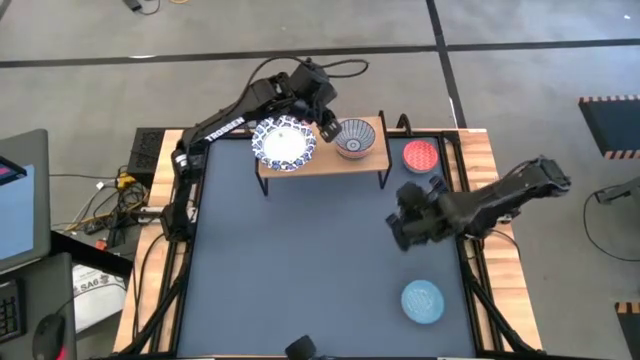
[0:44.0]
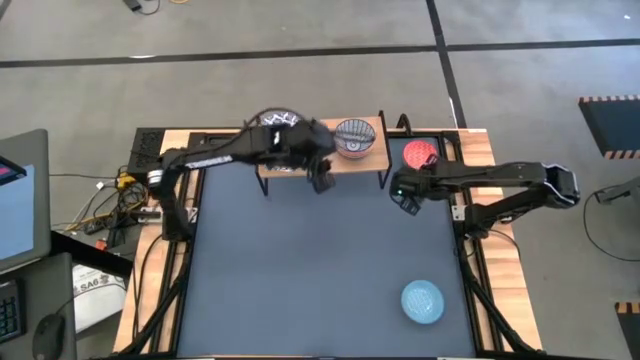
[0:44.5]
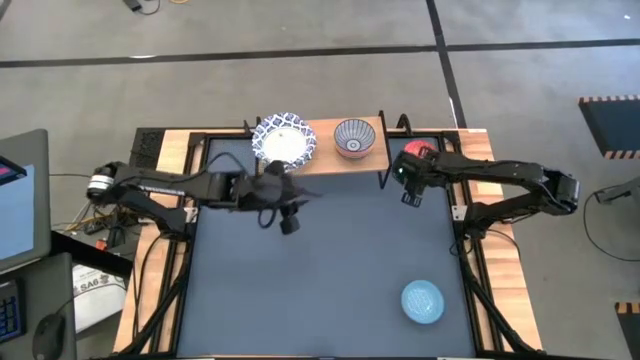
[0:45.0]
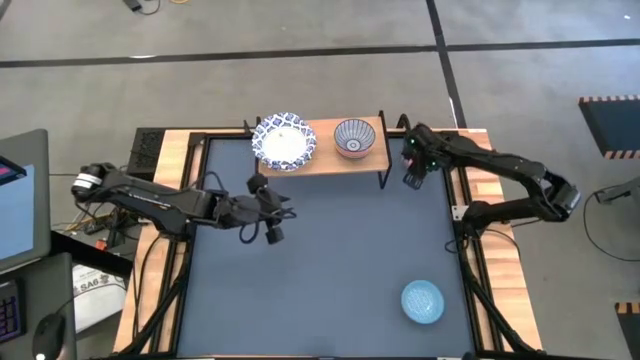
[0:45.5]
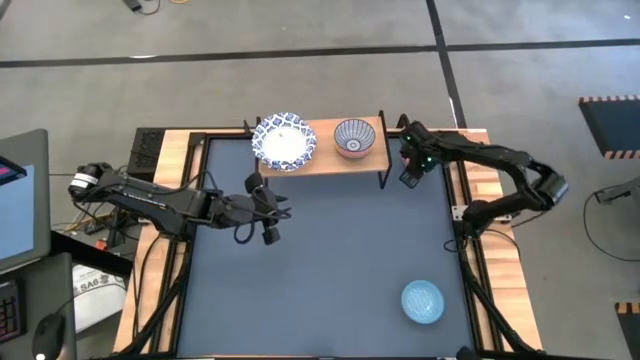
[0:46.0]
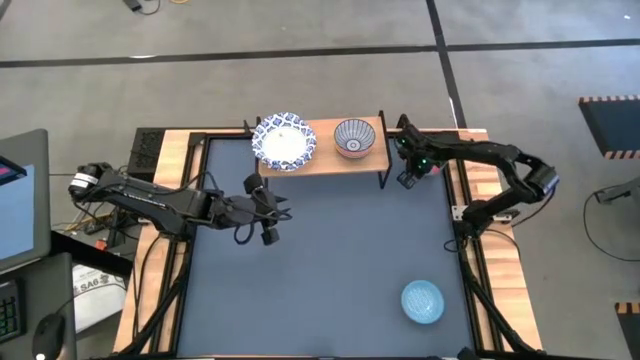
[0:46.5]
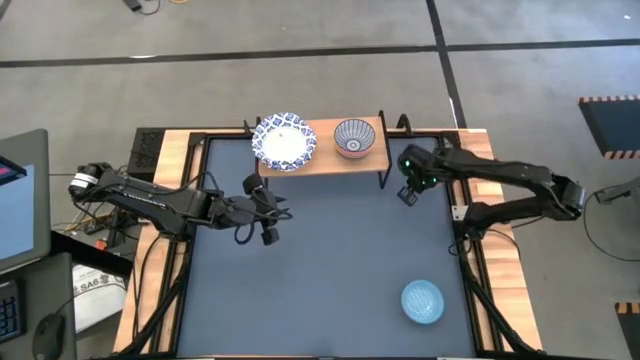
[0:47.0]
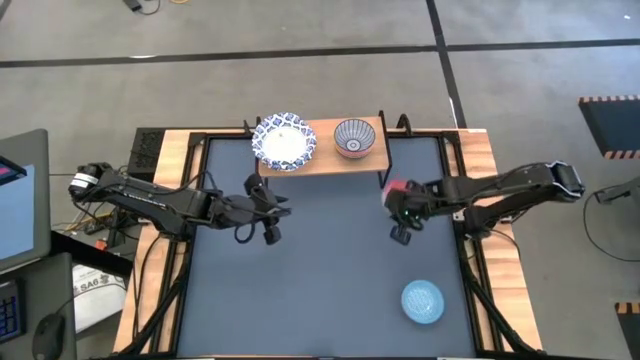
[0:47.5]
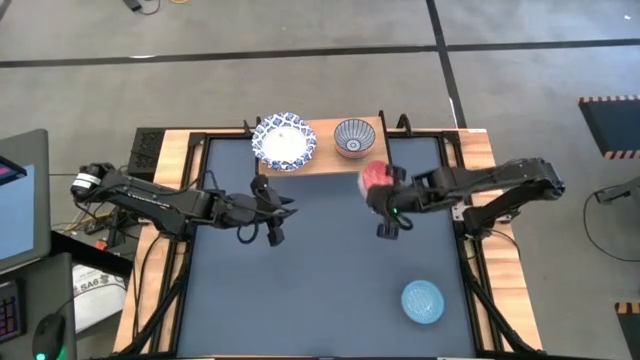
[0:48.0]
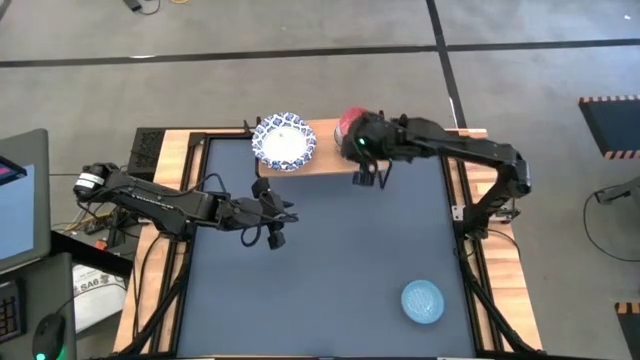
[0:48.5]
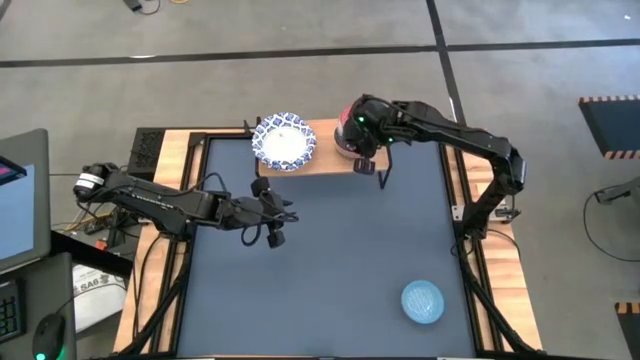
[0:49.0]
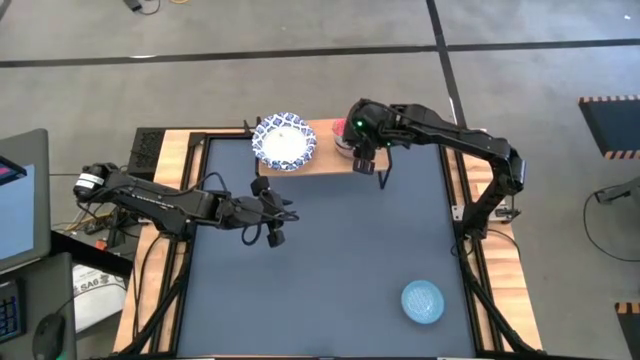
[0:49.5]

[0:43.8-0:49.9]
Task: Place and stack bowls onto a shelf
Stack the red patterned bowl on top of the blue patterned bowl on the shelf

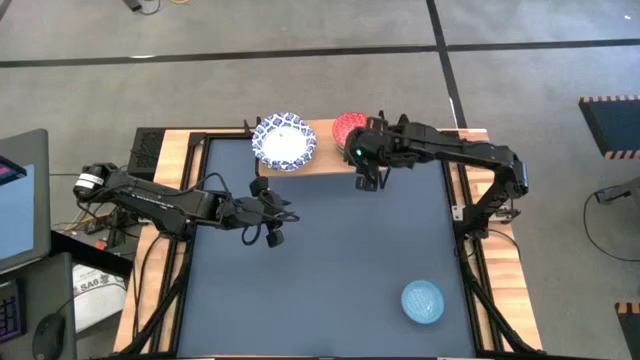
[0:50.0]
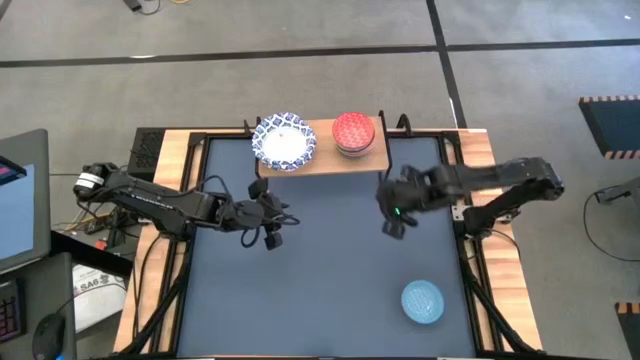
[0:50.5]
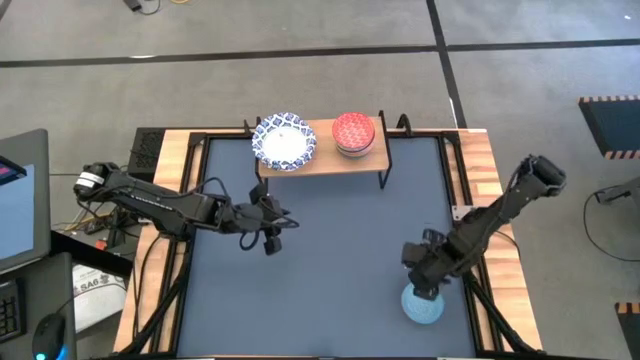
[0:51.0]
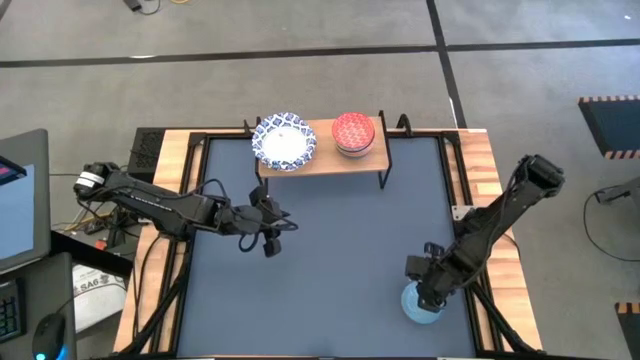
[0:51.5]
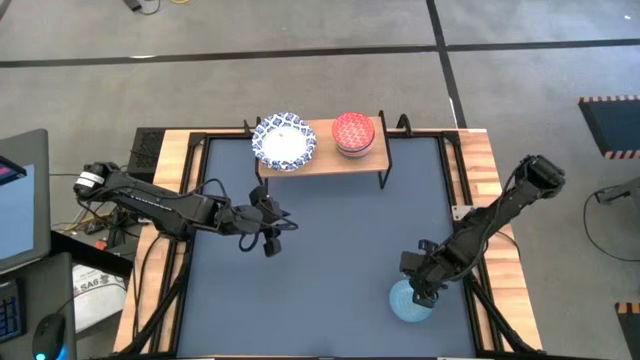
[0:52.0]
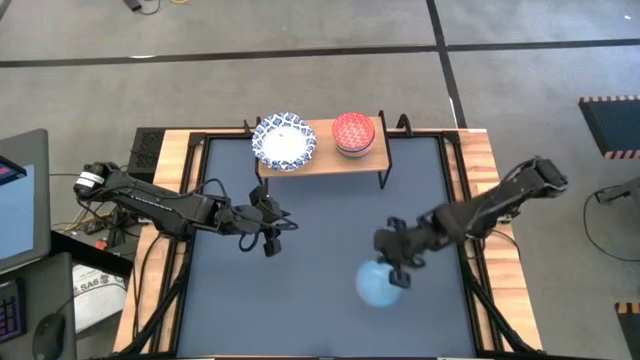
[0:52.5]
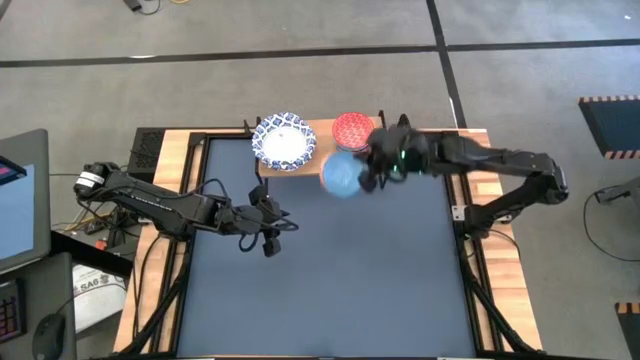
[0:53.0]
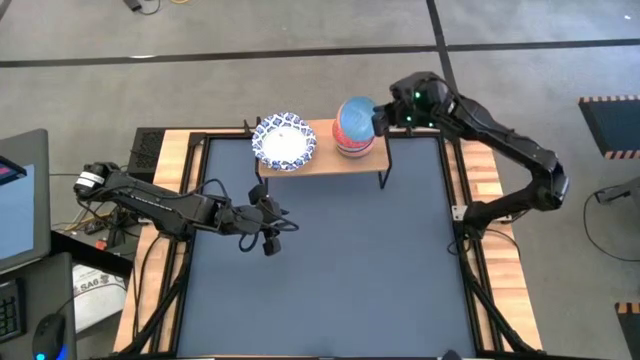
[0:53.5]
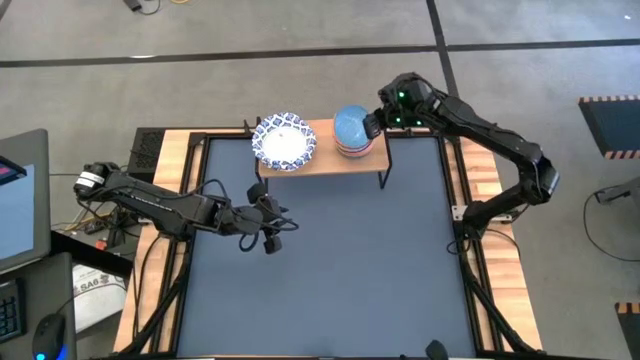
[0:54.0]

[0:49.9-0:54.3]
Stack the light blue patterned bowl on top of the red patterned bowl on the shelf

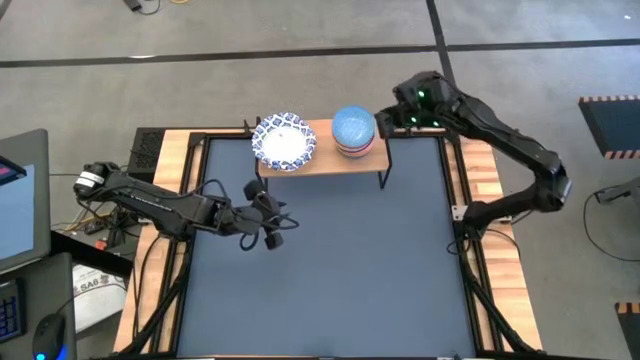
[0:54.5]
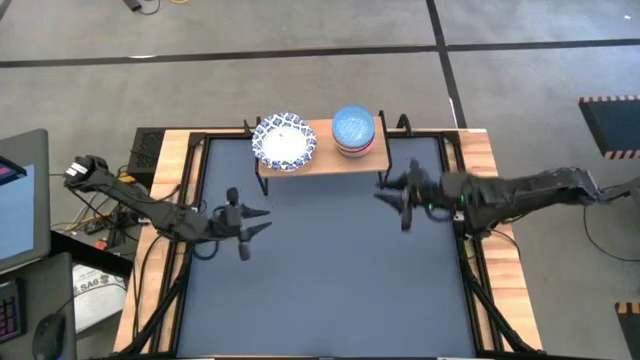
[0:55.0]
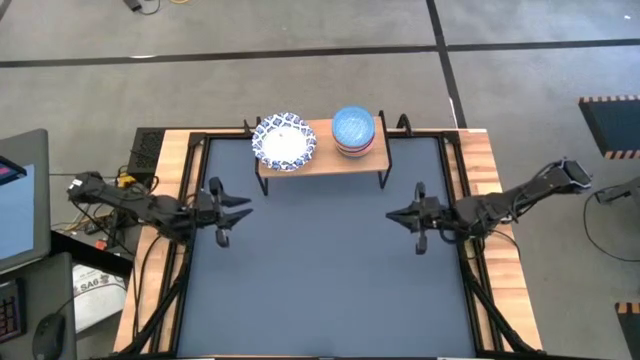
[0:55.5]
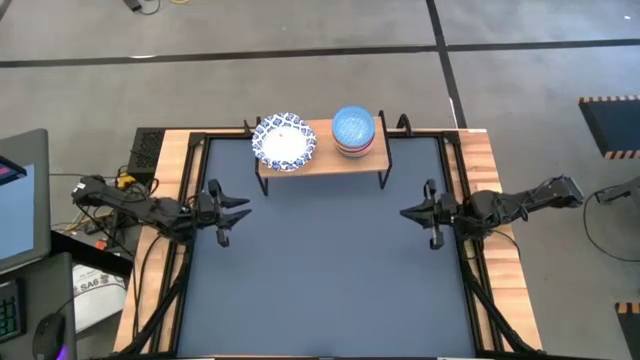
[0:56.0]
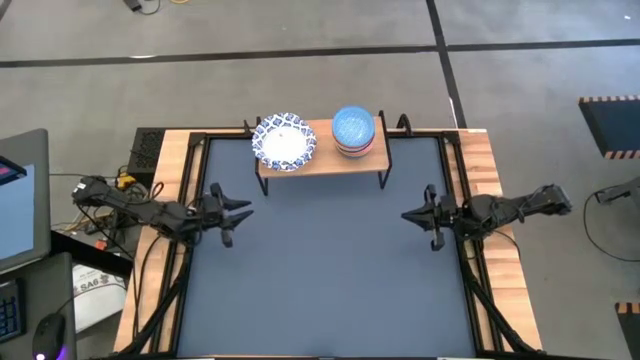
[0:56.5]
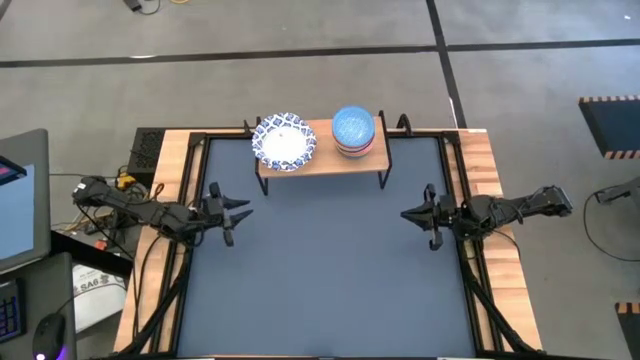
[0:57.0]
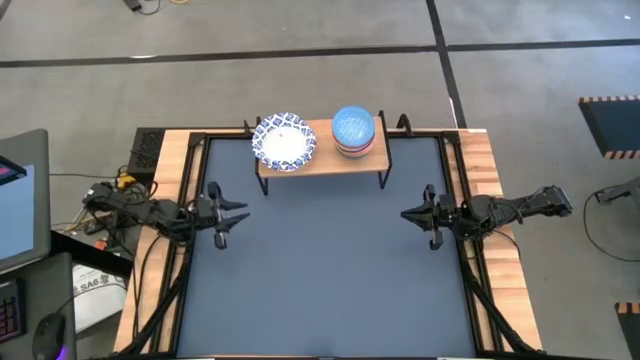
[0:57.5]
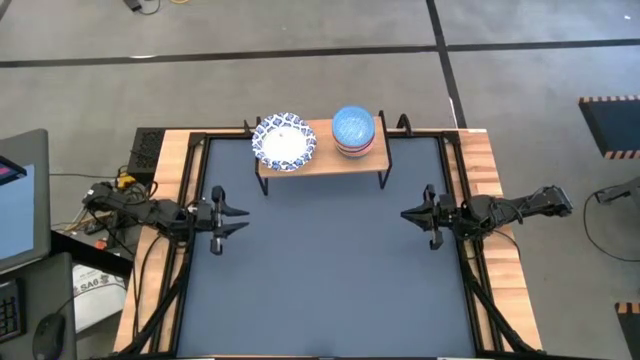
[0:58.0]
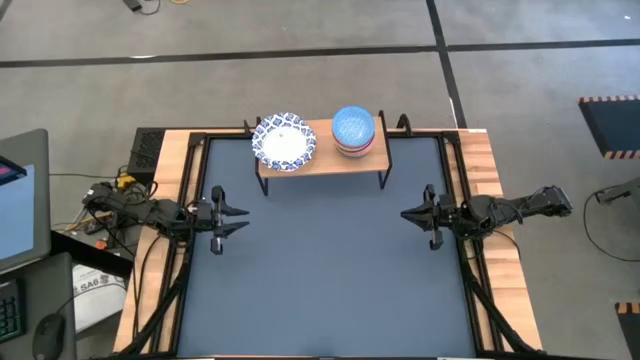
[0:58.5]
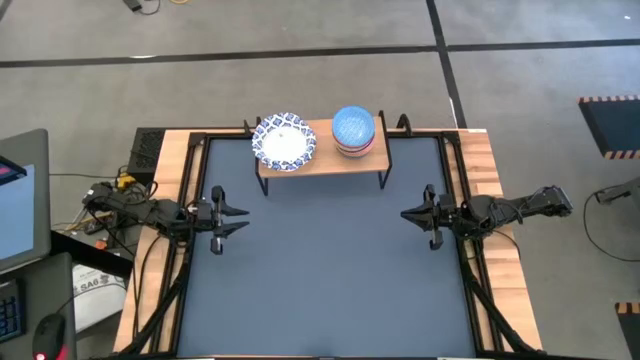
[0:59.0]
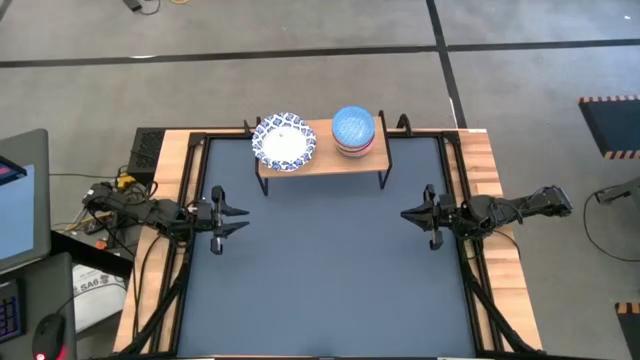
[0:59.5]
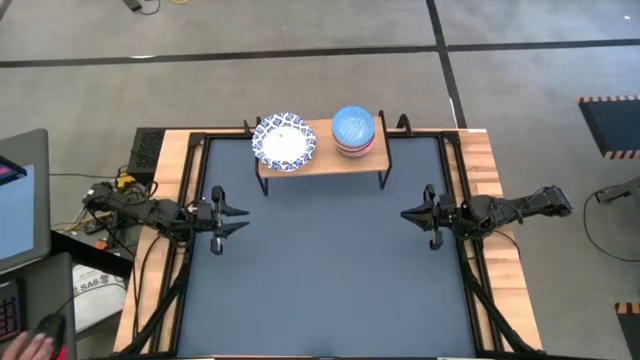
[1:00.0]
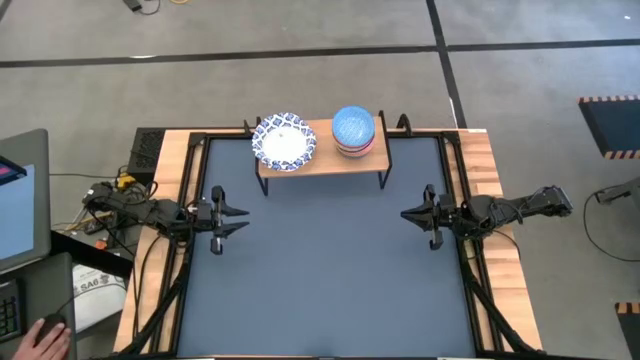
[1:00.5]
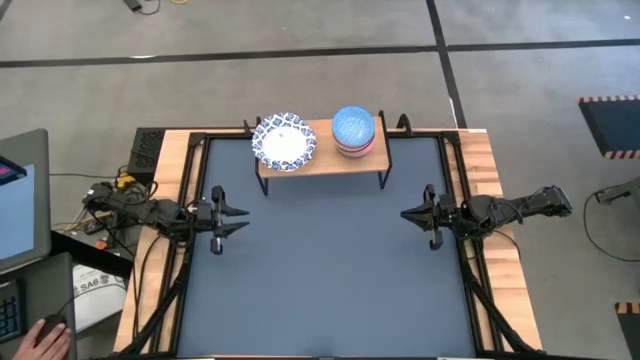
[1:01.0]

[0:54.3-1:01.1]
Return to Home Position

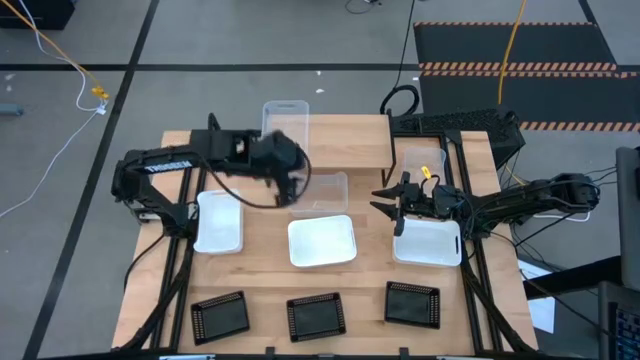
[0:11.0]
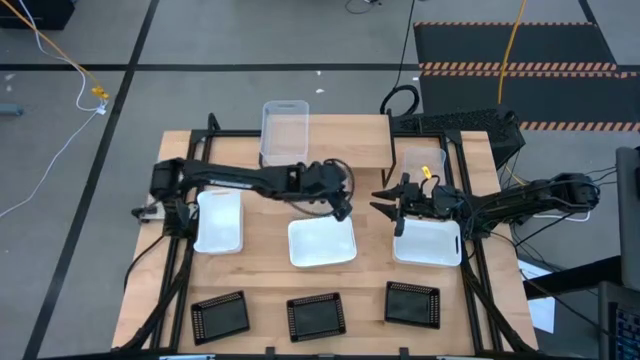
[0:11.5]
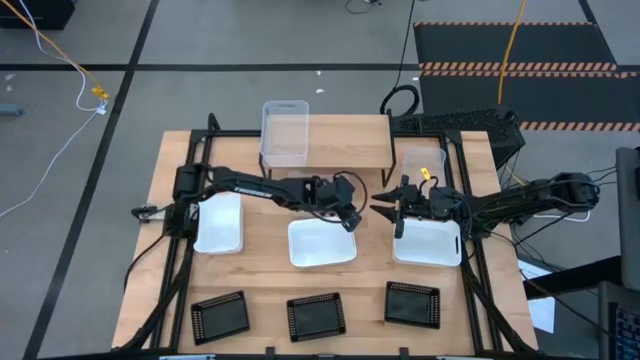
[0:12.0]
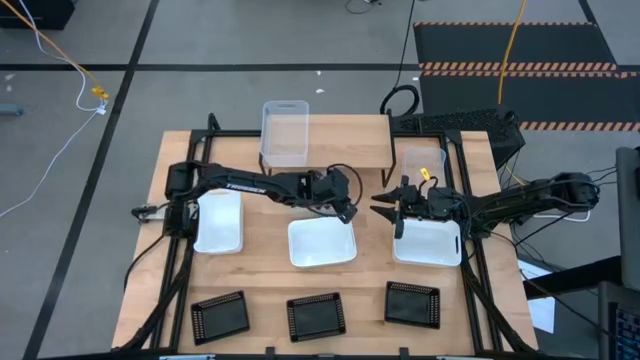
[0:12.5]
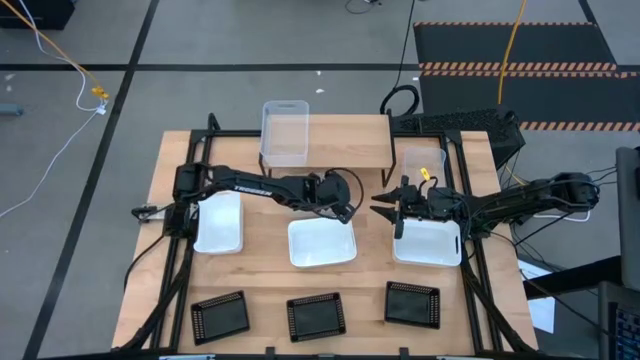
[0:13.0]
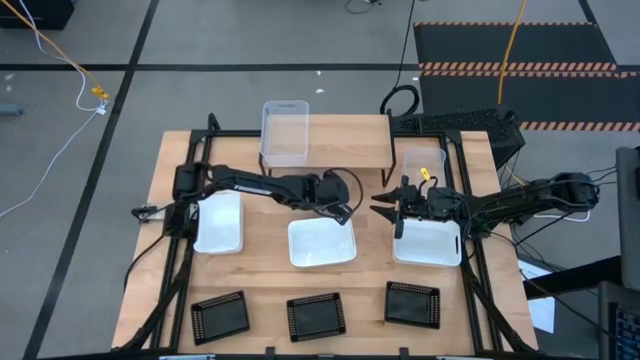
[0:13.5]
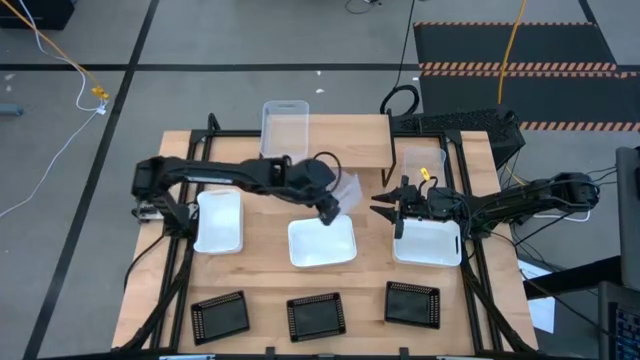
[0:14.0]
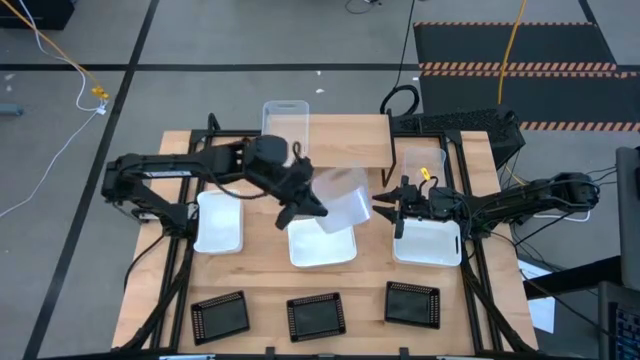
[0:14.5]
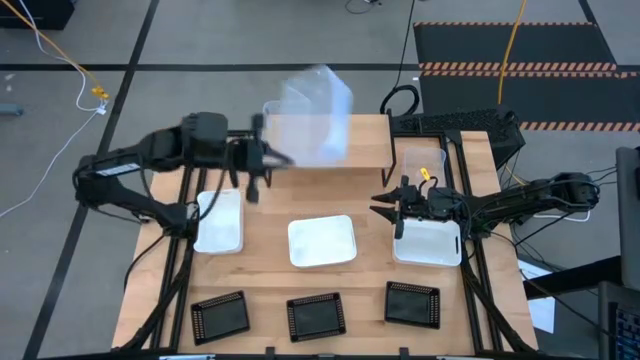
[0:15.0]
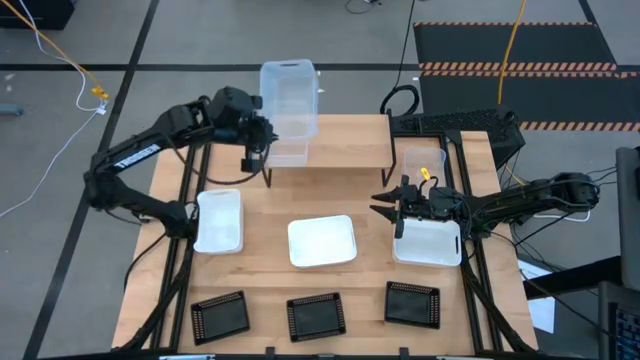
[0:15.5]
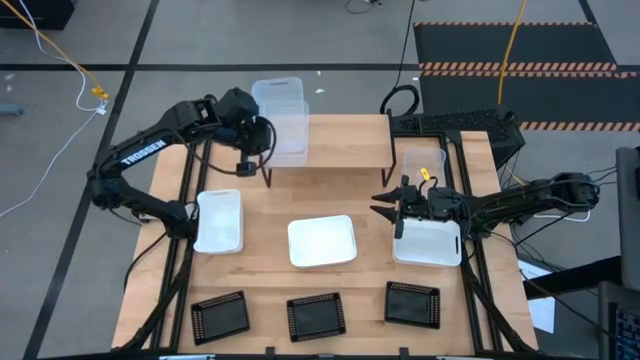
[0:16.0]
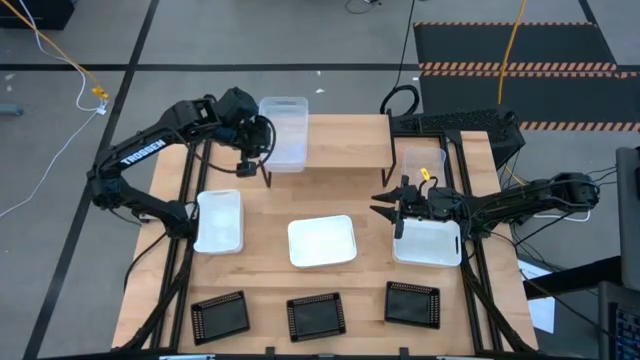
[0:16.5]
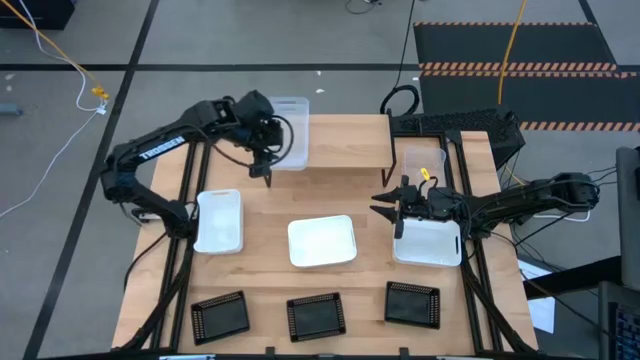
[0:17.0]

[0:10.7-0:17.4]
Task: Stack baskets on shelf by color
Stack the left transparent bin on the transparent bin on the shelf
